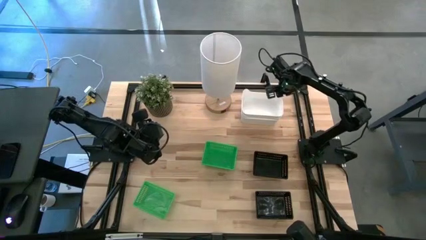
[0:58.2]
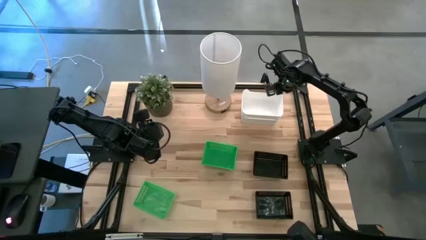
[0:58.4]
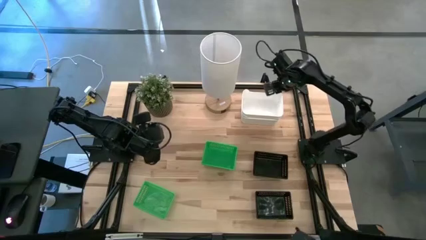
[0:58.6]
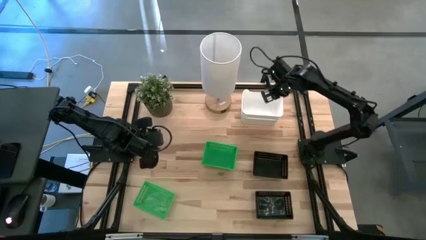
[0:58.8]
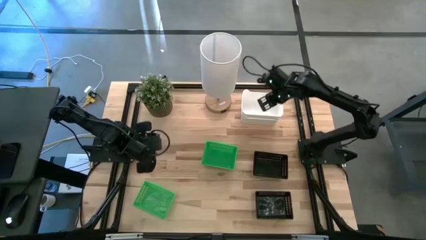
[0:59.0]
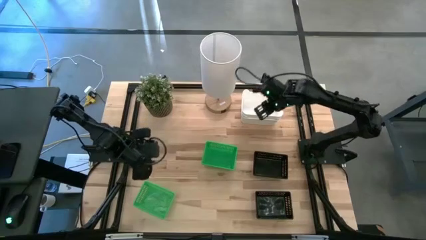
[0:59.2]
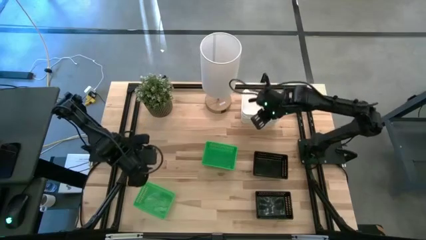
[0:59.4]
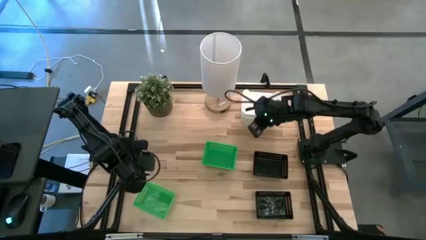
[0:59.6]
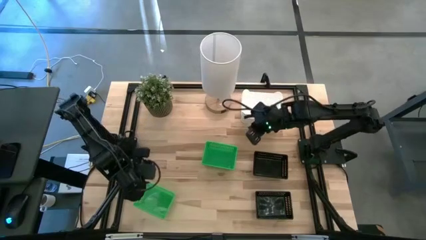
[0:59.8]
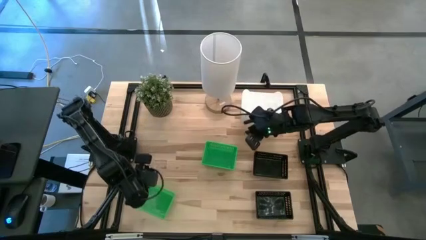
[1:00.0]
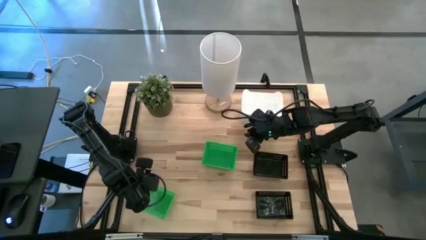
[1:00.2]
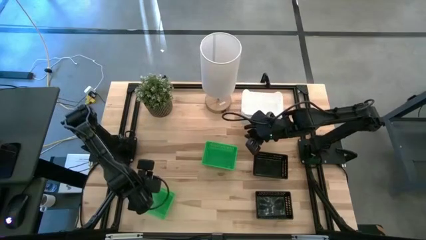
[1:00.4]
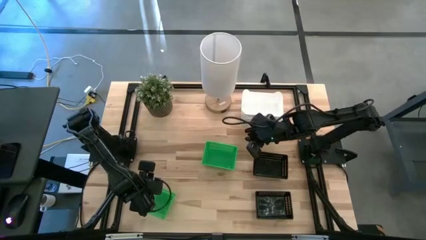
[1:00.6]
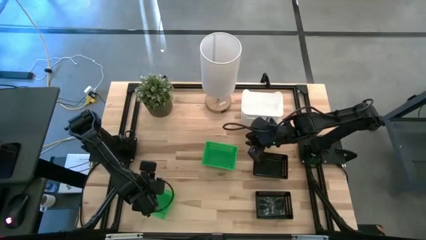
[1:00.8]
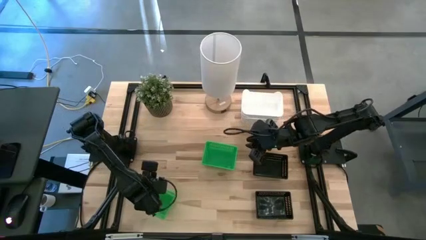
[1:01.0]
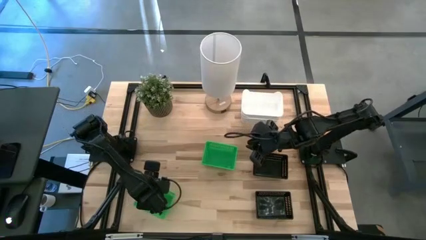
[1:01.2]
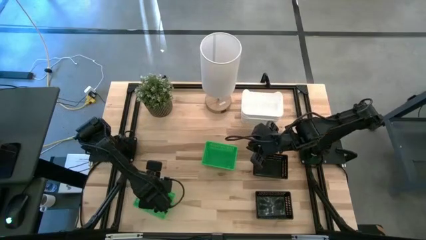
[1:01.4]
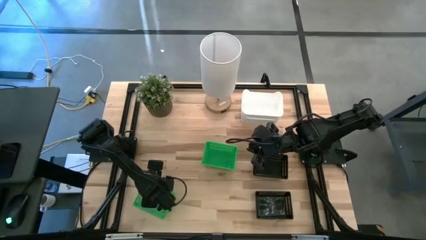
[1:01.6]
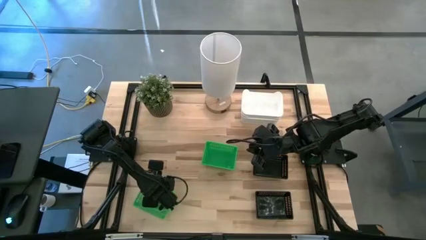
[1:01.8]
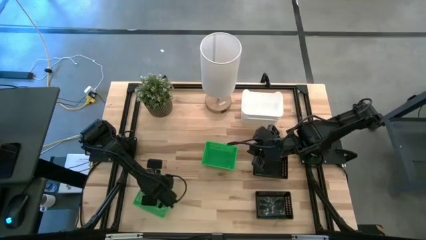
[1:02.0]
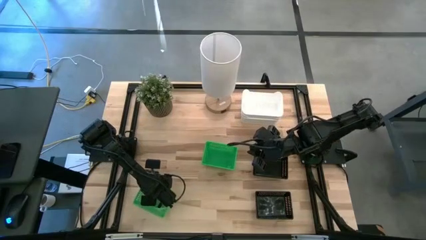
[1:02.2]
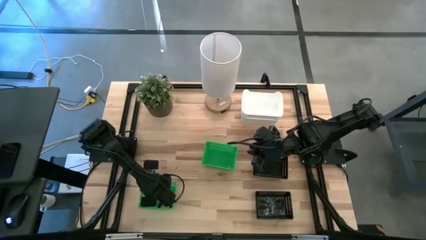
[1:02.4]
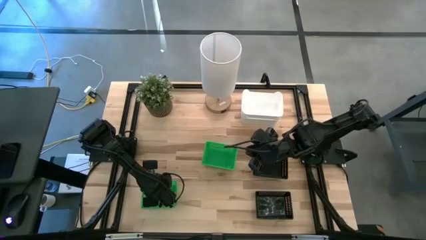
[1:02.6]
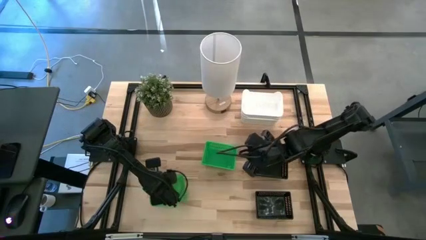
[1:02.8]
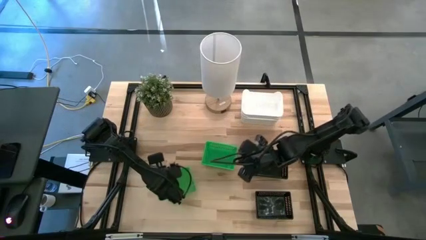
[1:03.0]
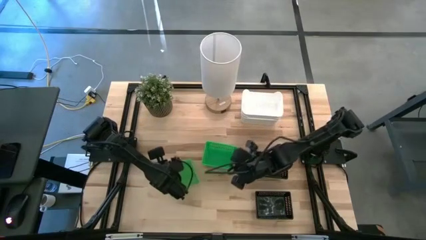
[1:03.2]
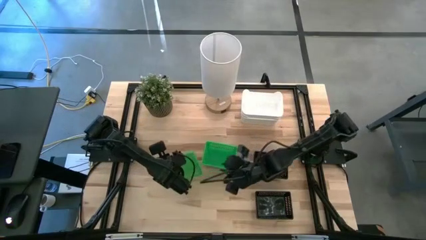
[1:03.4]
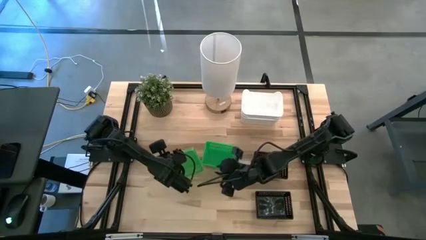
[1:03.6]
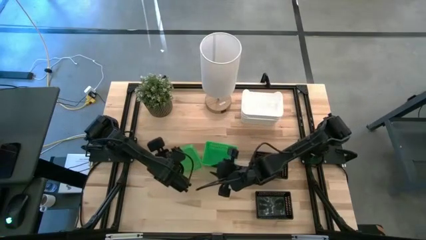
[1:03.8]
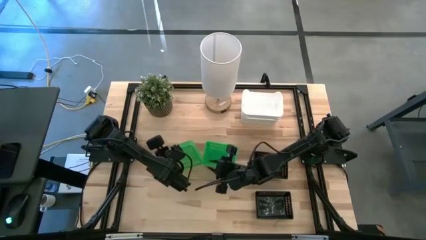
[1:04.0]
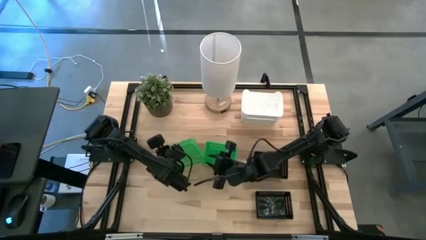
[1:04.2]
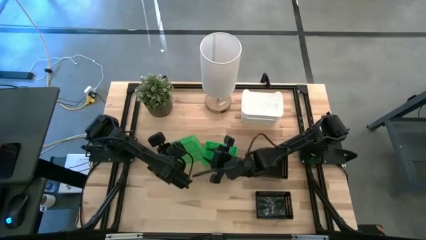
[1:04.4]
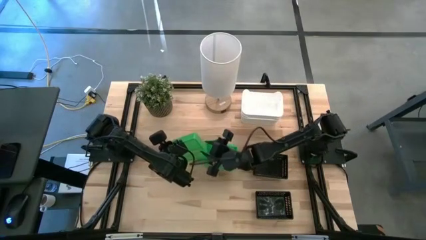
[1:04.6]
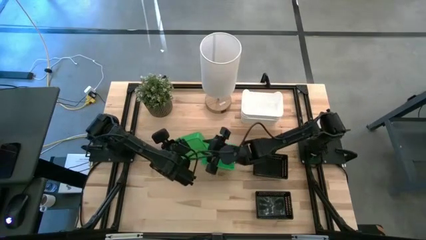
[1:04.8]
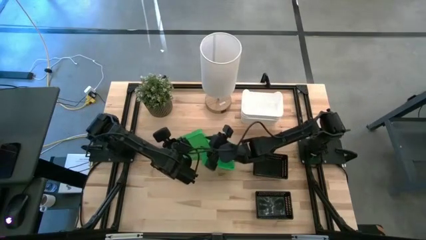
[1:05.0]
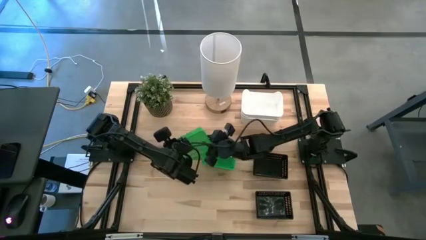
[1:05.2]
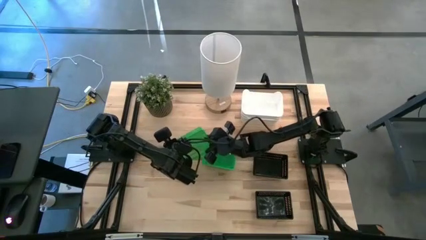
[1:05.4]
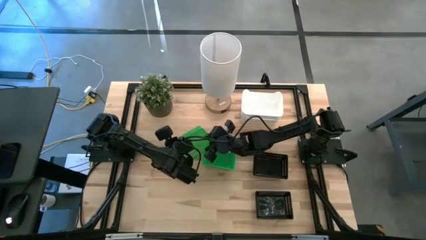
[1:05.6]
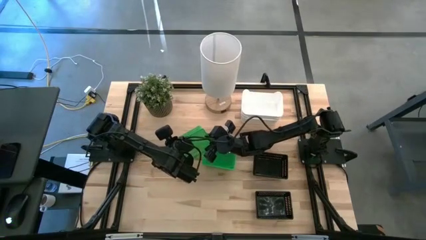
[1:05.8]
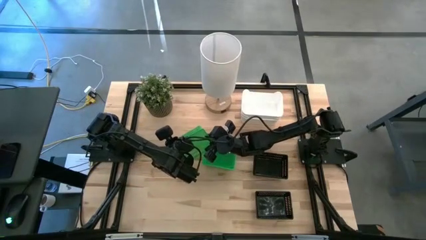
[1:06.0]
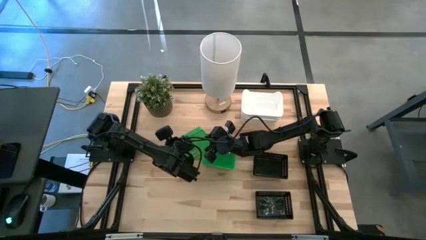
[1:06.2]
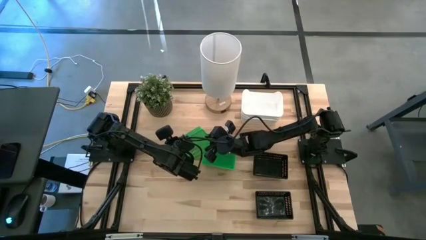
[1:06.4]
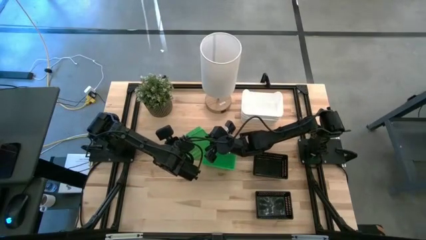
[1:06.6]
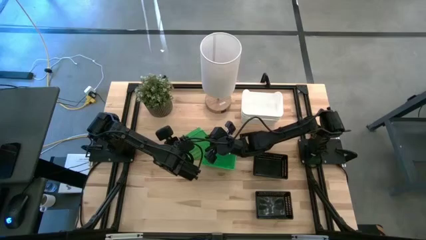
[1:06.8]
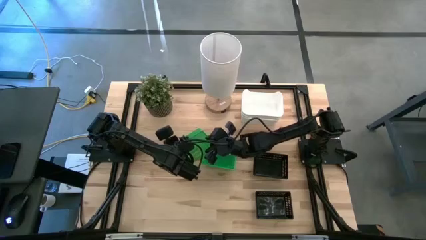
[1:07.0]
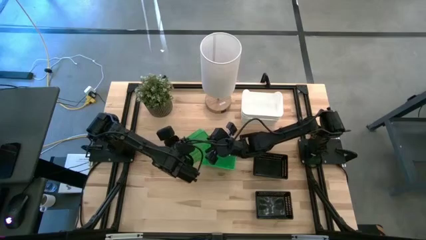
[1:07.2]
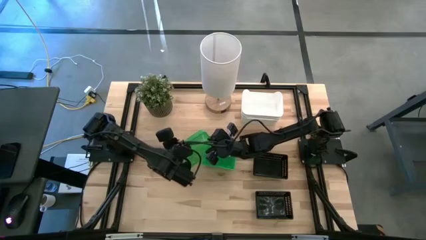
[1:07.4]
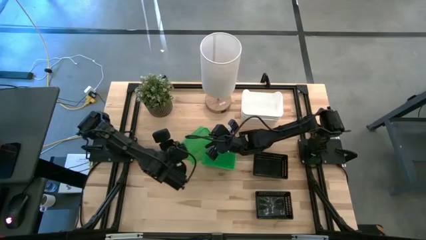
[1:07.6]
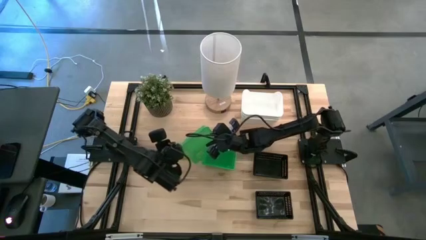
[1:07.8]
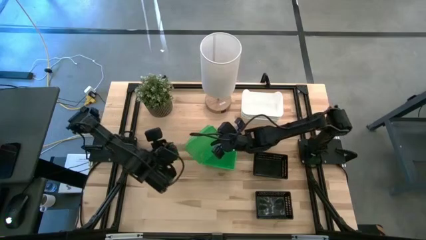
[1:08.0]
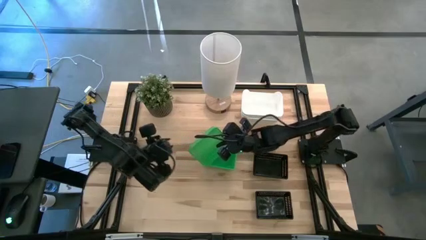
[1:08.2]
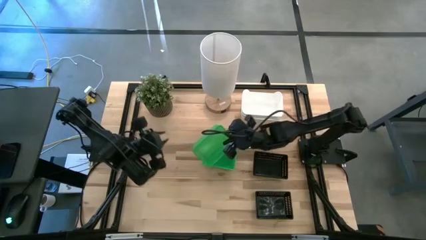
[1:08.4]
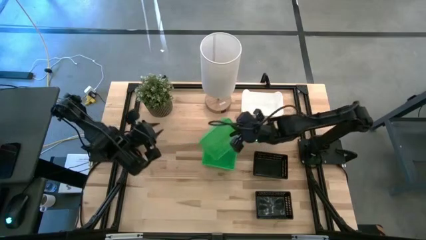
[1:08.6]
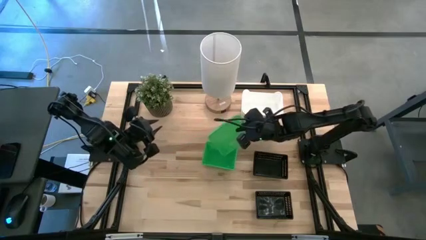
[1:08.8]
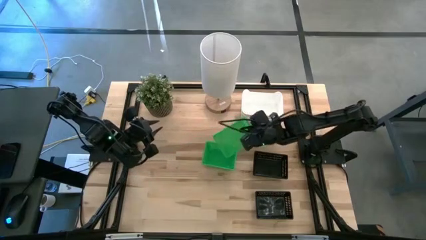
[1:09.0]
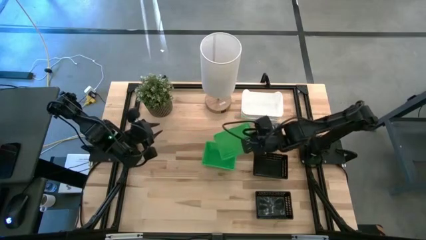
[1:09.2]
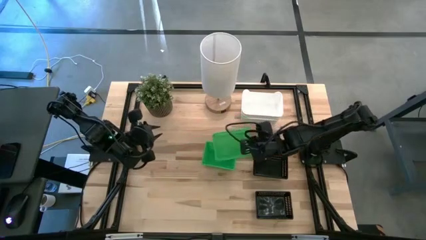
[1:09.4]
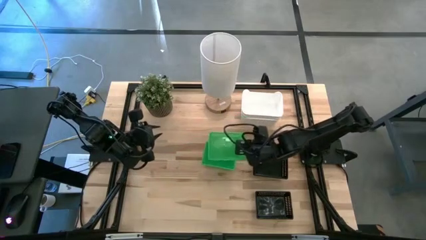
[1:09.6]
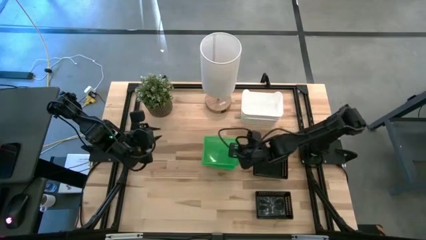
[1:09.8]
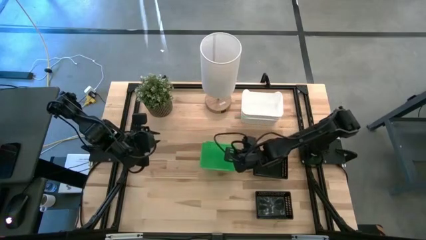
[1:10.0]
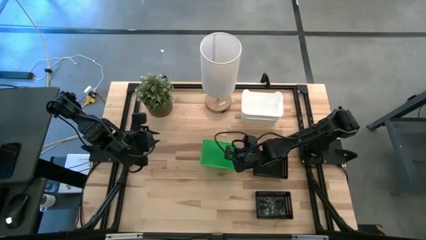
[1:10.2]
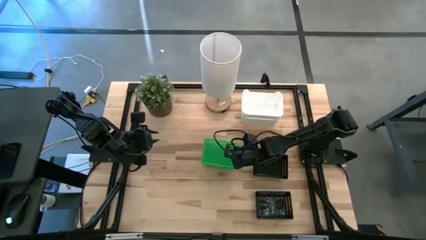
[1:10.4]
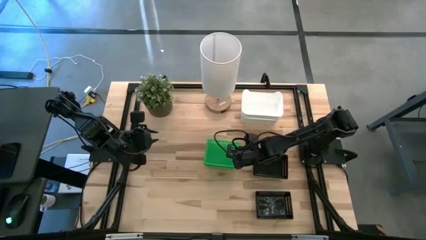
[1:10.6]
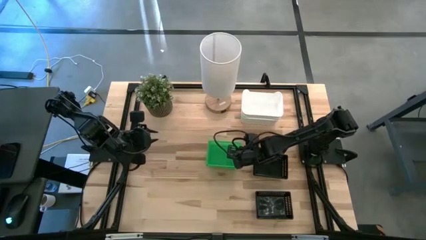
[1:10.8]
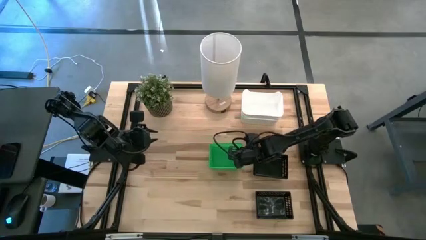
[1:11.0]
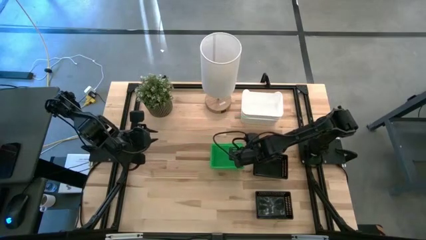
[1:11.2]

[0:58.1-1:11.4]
Stack the green bin on top of the stacked green bins
